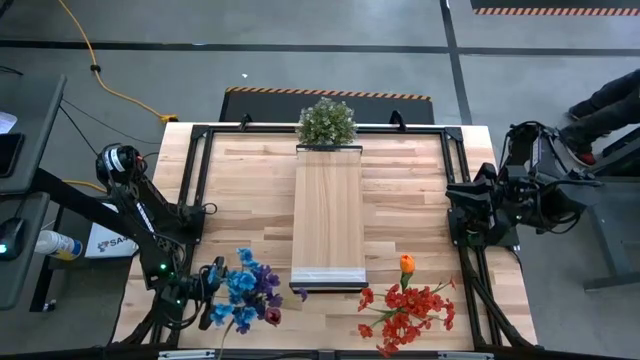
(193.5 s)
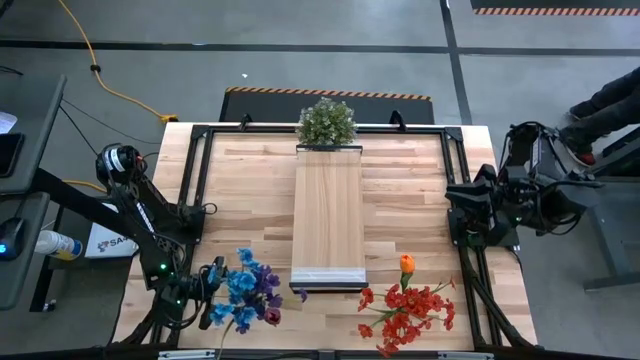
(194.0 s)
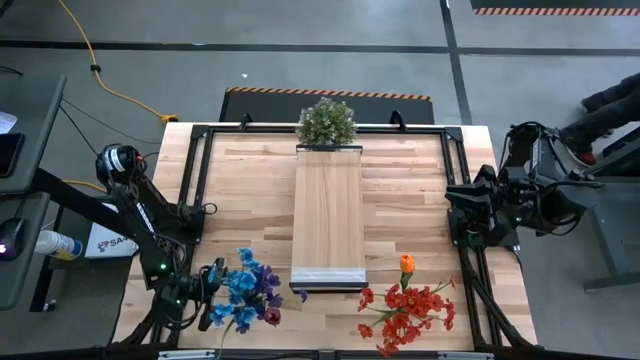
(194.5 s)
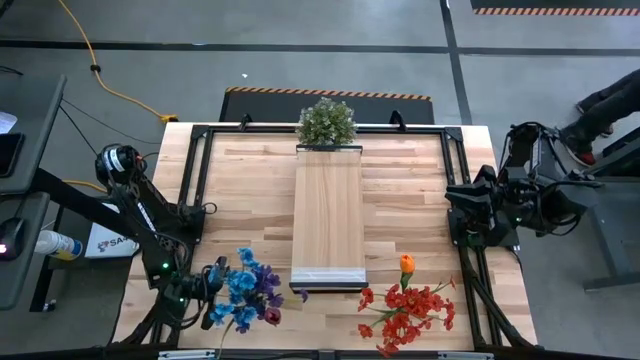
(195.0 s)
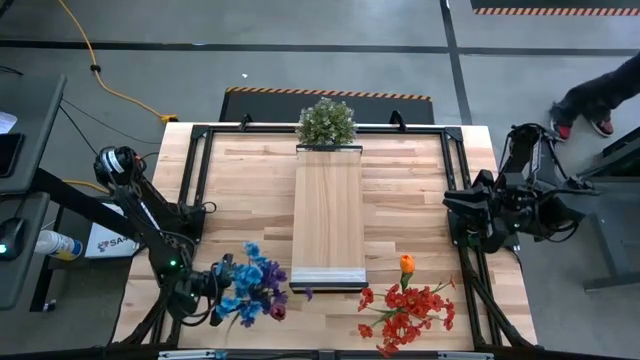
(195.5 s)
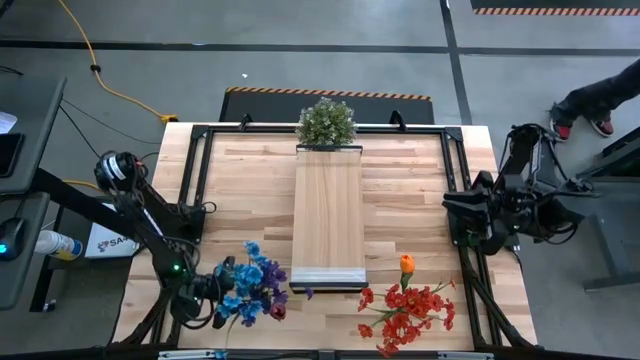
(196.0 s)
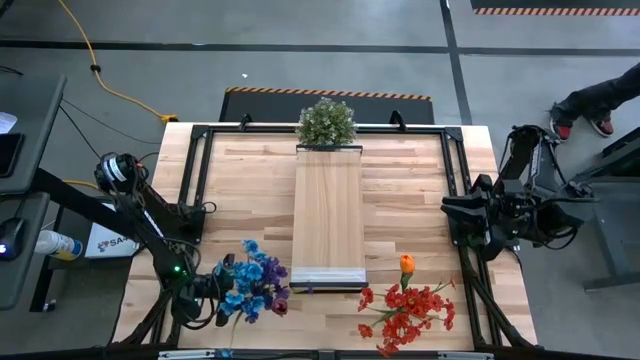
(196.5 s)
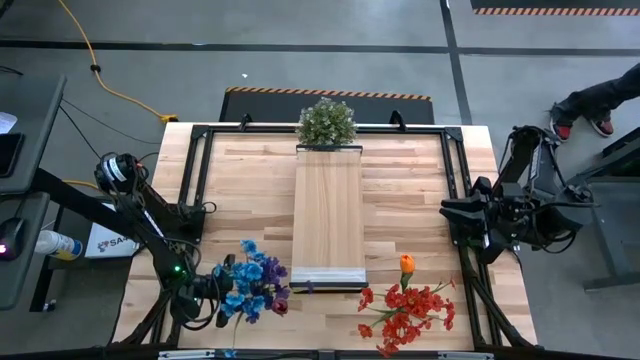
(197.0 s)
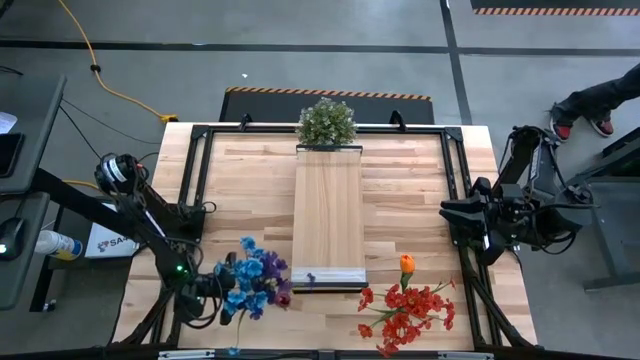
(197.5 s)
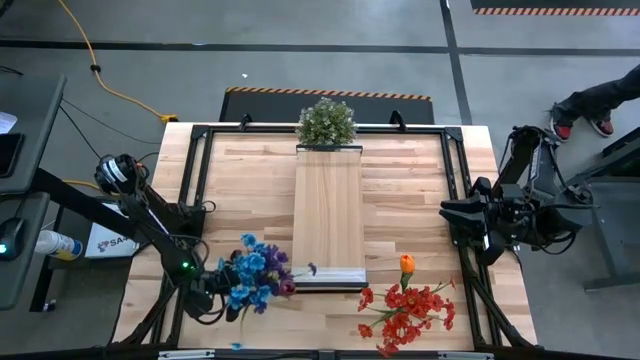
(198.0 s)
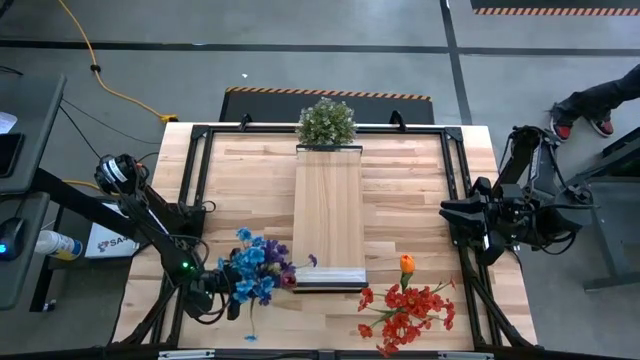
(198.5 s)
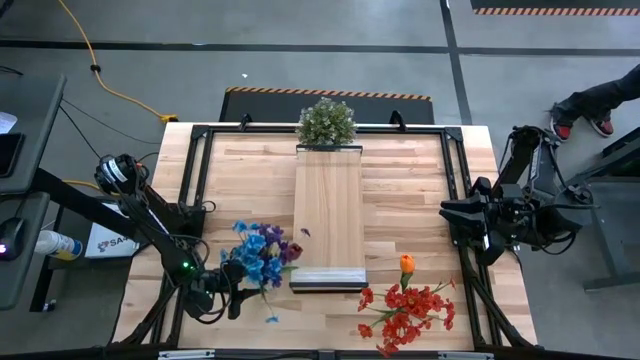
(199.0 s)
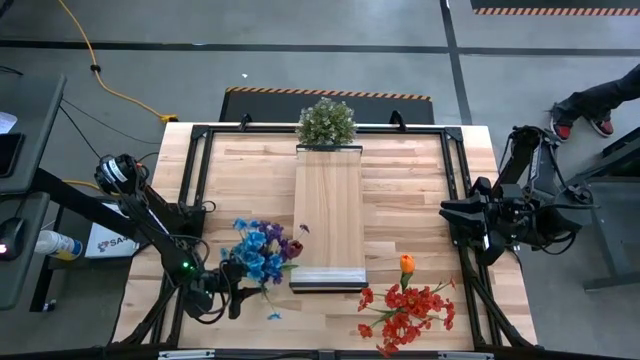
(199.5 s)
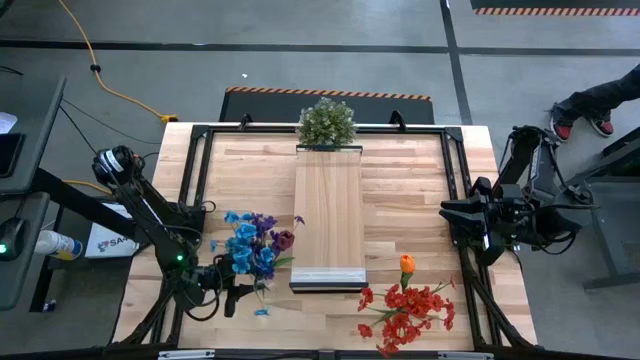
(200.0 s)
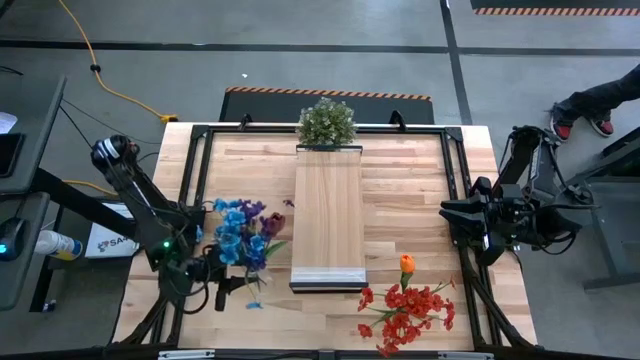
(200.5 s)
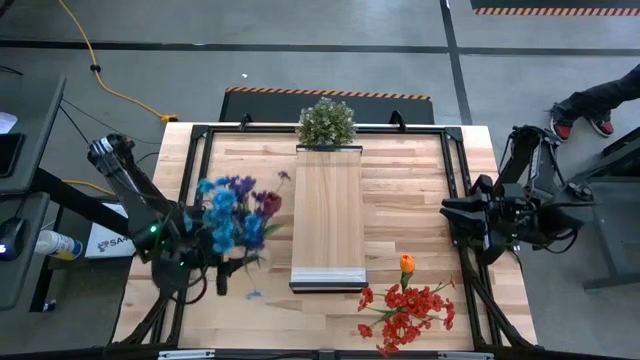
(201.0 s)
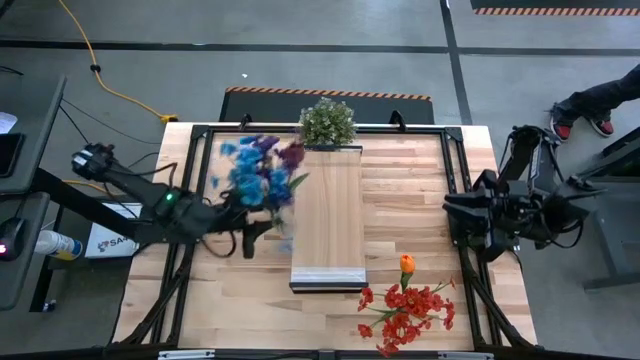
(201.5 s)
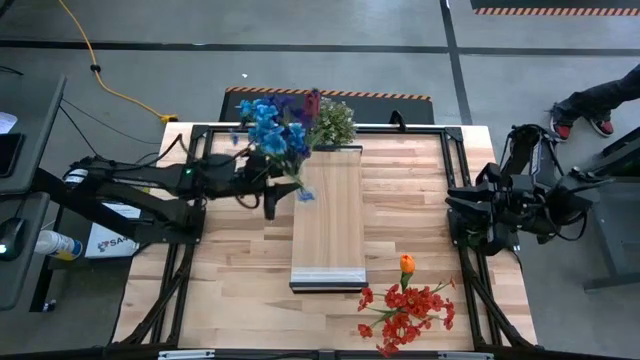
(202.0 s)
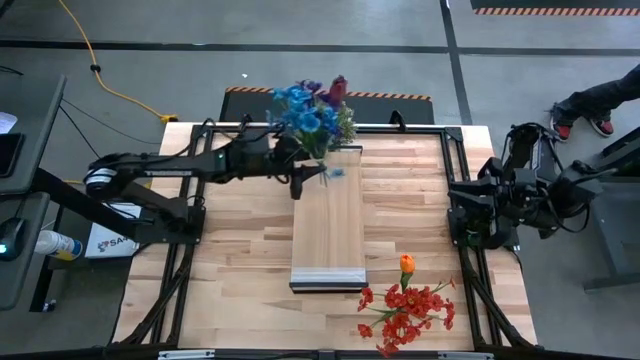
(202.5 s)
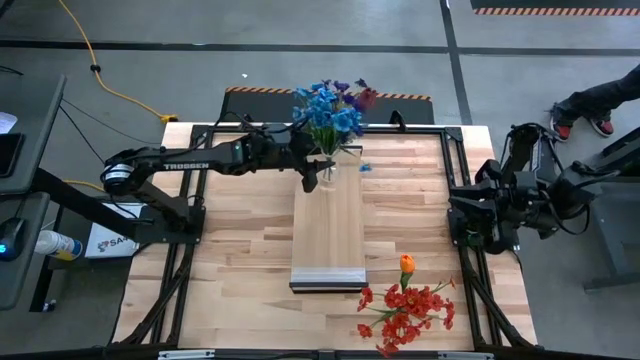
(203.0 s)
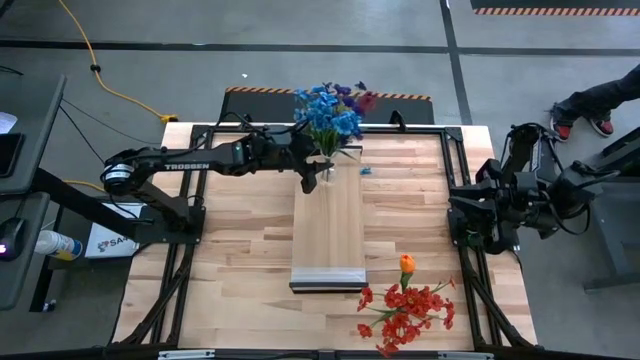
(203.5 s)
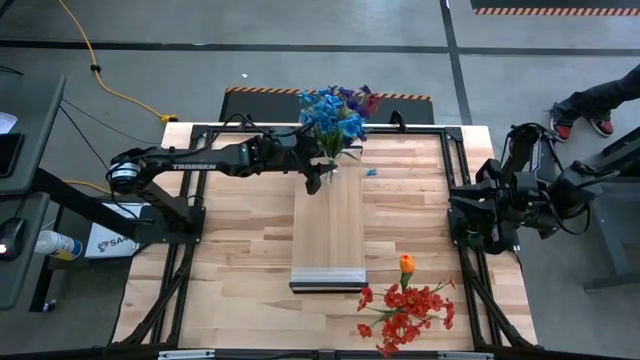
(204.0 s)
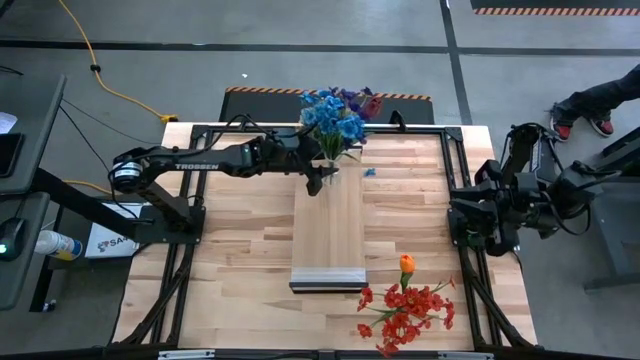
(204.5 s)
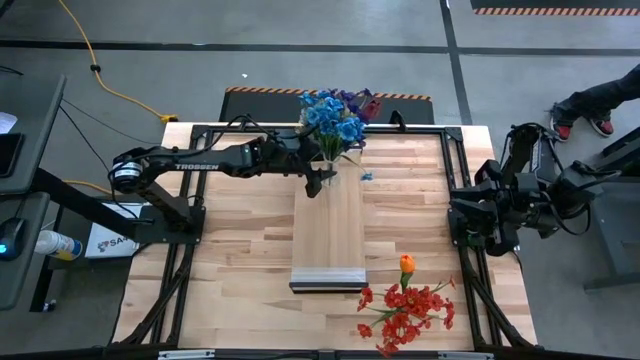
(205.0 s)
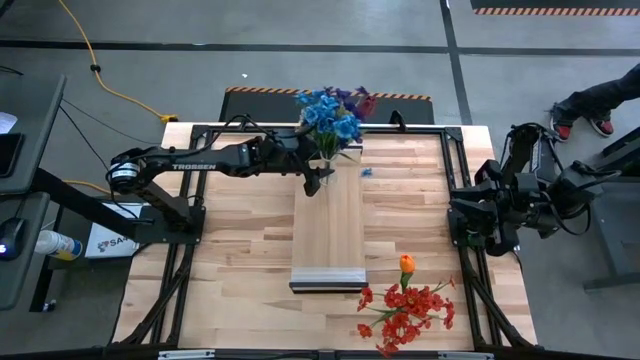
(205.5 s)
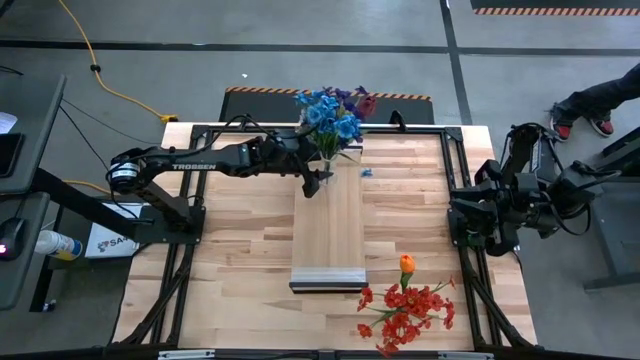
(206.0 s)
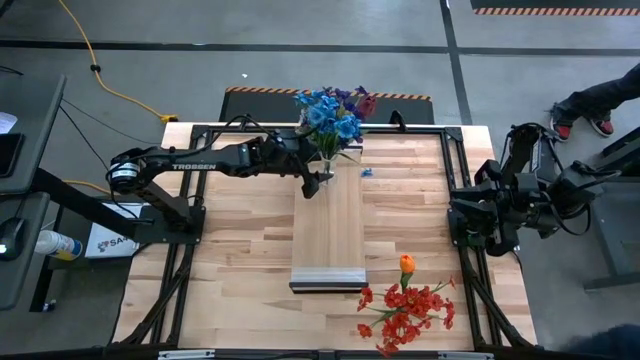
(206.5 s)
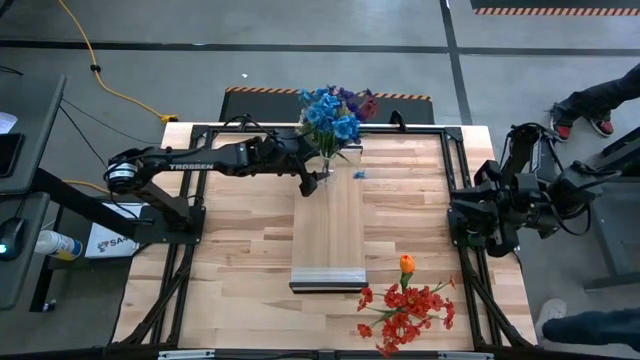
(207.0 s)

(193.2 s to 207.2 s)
Task: Pick and place flowers into a vace then onto a shelf
Put the left transparent vase on the shelf

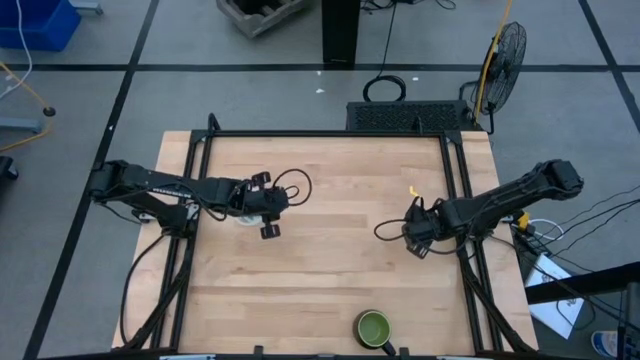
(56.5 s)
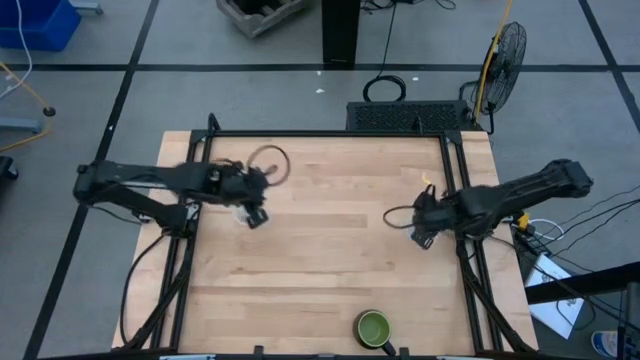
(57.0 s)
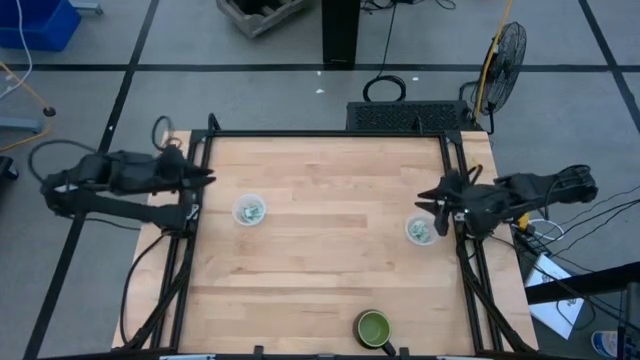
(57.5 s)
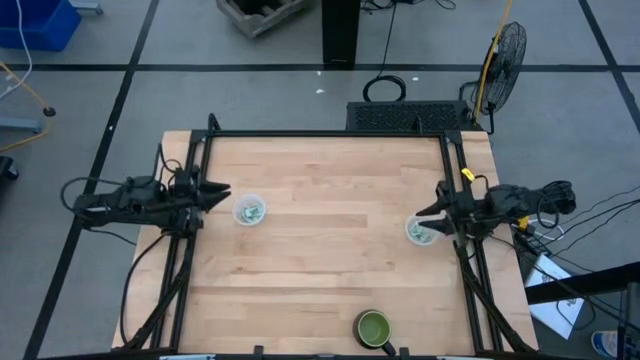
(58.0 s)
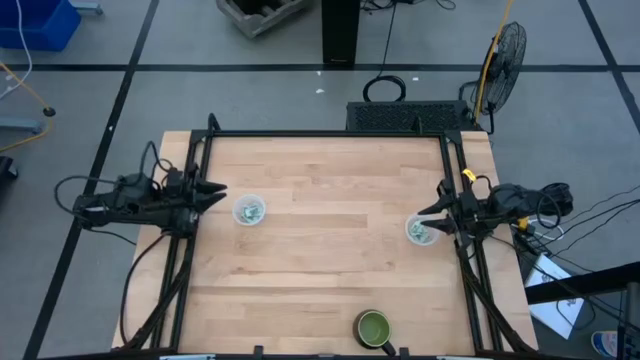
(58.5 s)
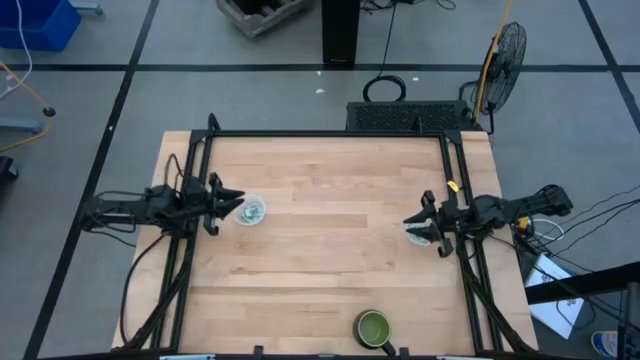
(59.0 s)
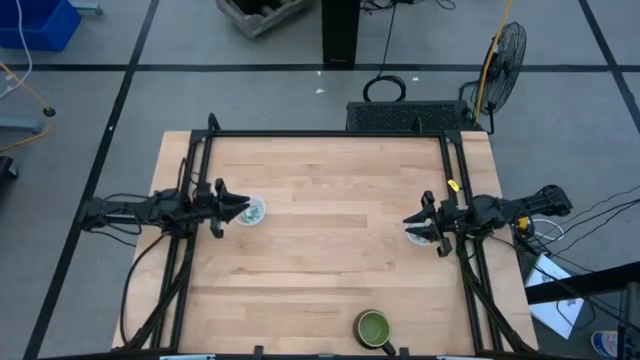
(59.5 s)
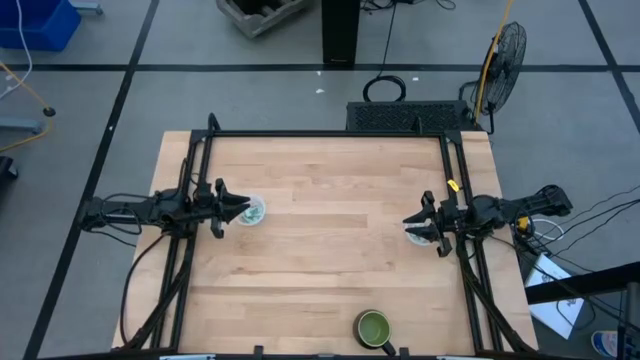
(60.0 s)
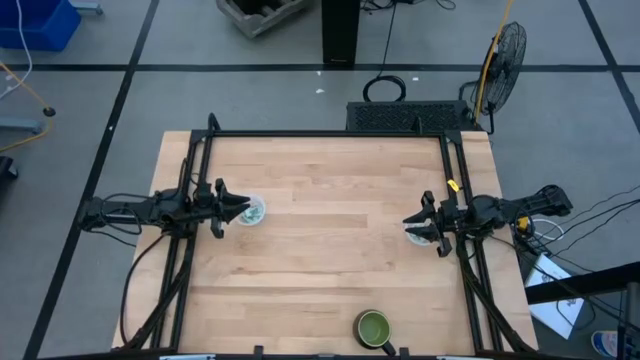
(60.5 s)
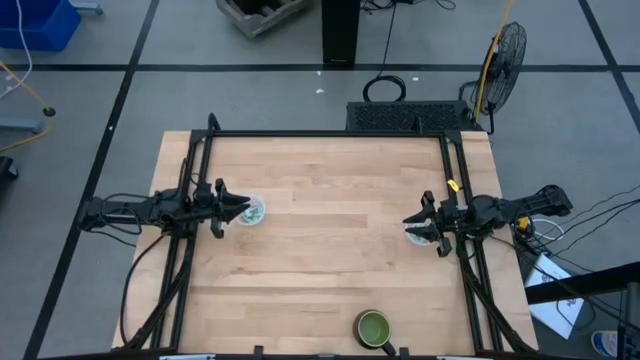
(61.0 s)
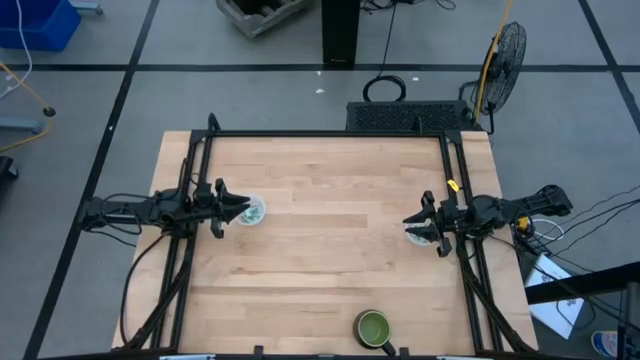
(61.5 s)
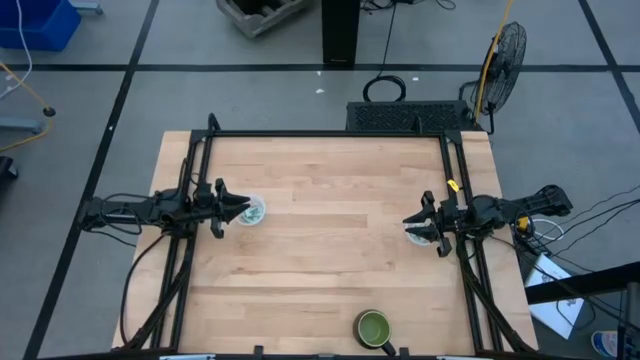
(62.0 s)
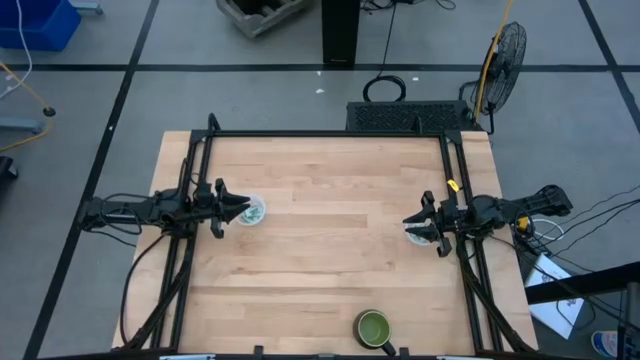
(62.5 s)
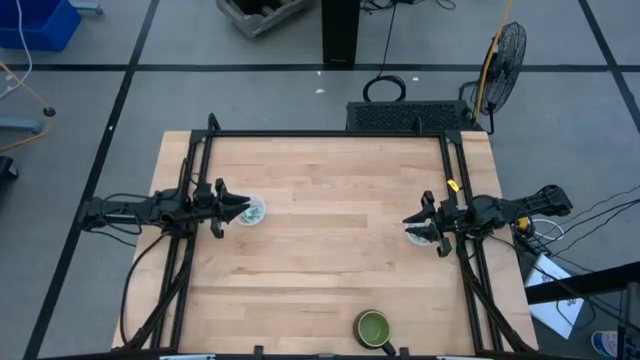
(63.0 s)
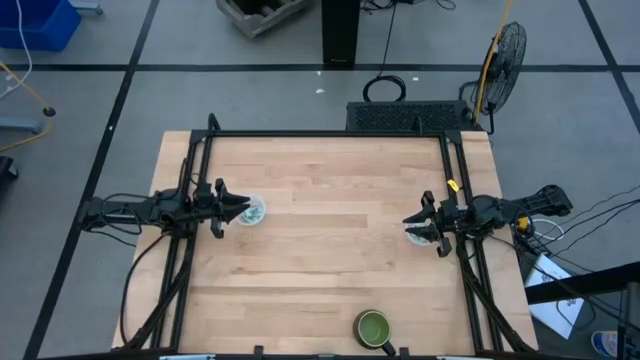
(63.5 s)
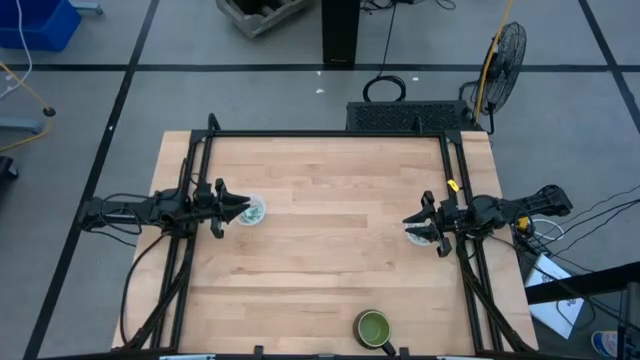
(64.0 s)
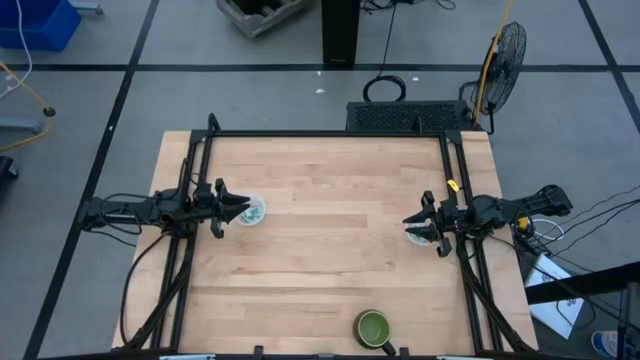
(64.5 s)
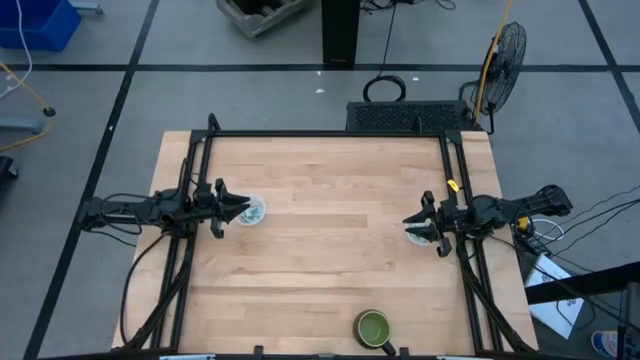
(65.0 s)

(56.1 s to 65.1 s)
Task: Pick and place Stevia / Truvia into bins
Return to home position
